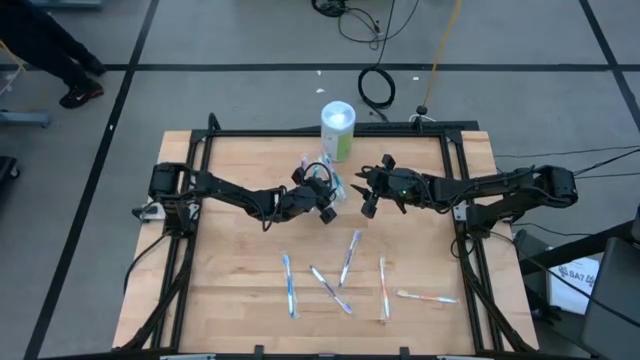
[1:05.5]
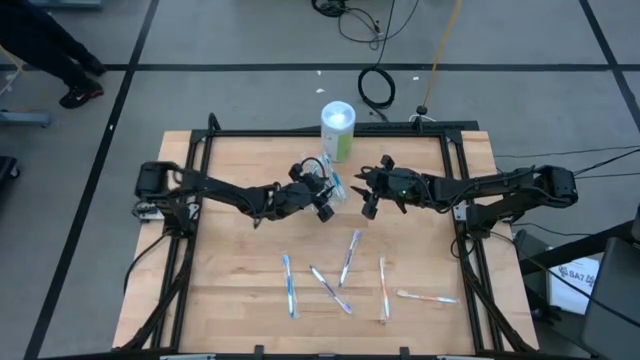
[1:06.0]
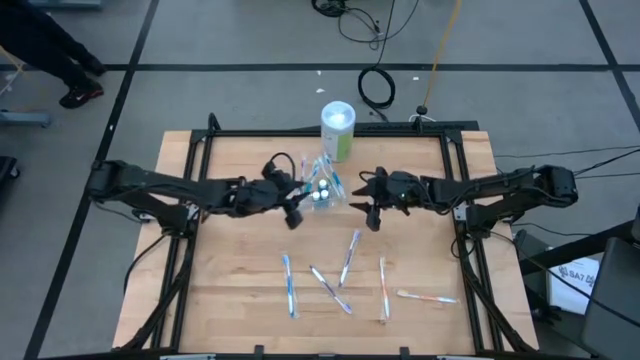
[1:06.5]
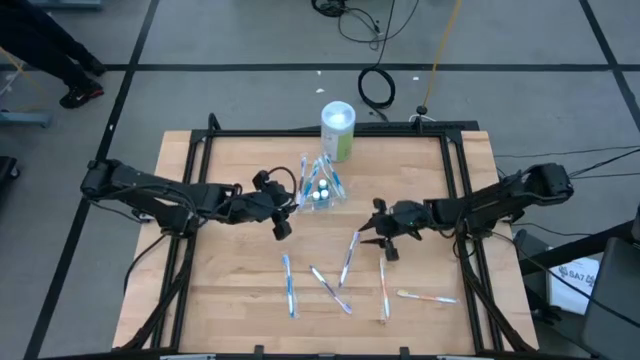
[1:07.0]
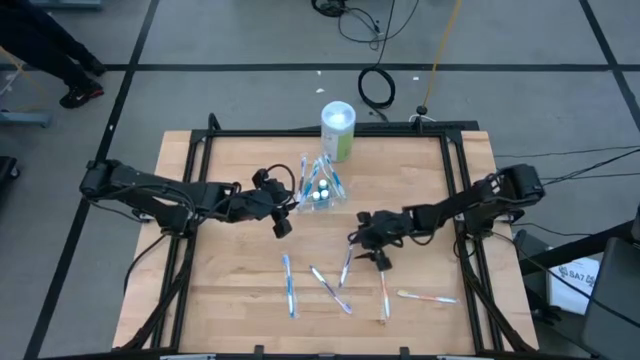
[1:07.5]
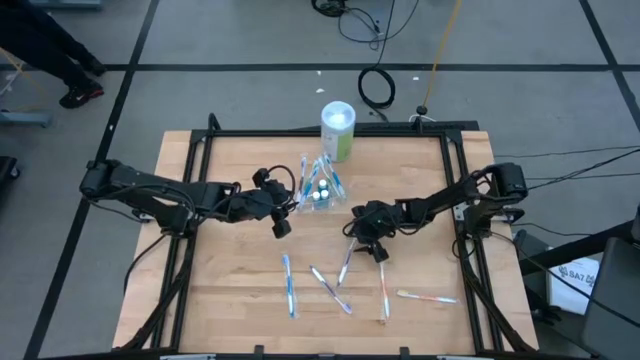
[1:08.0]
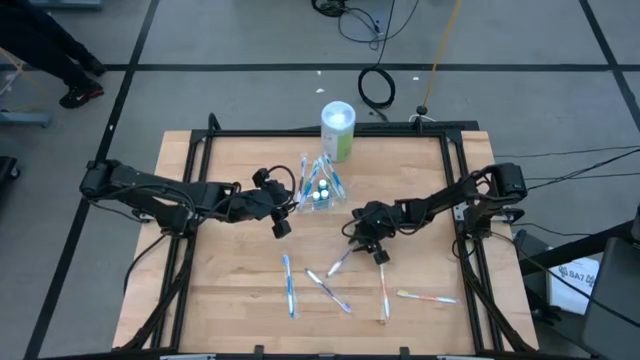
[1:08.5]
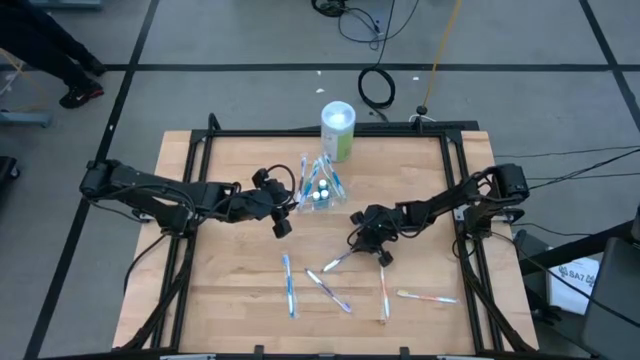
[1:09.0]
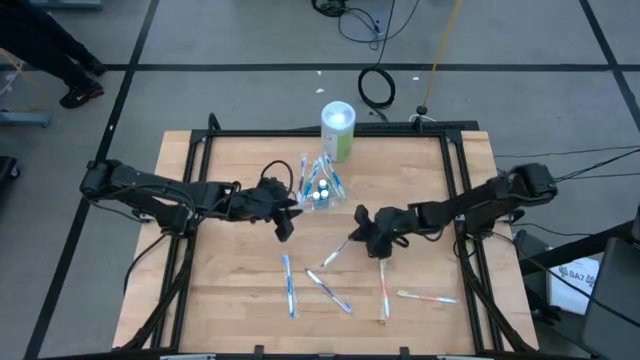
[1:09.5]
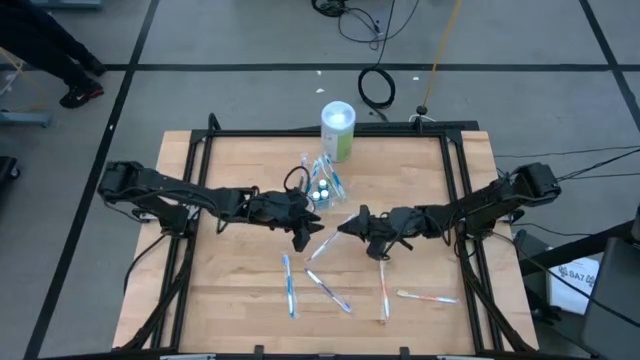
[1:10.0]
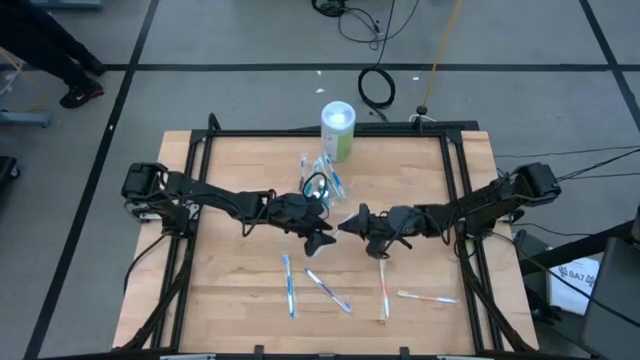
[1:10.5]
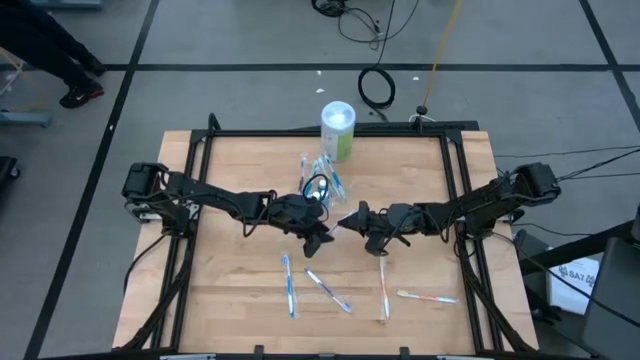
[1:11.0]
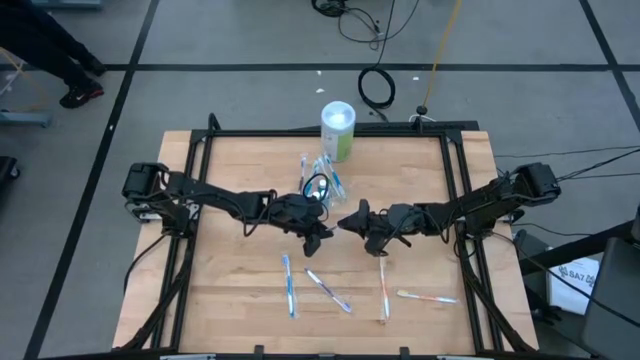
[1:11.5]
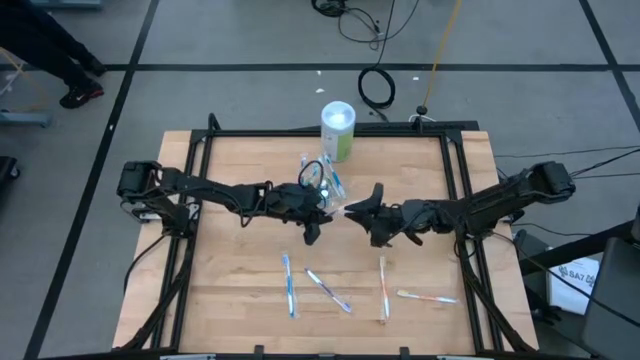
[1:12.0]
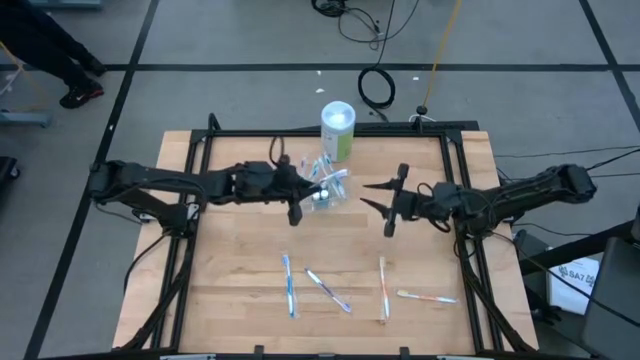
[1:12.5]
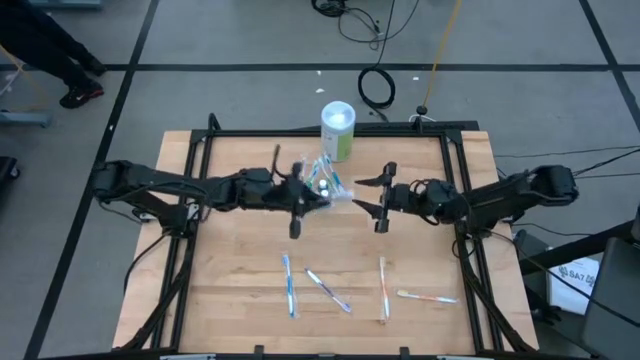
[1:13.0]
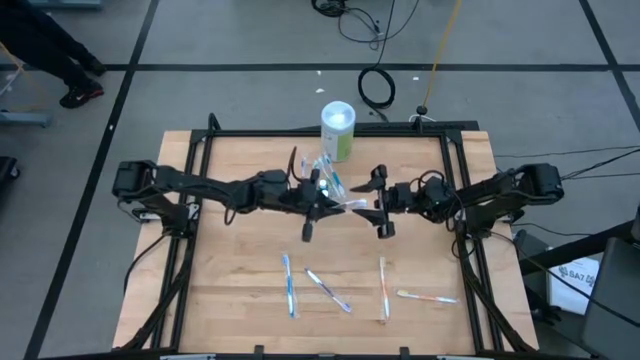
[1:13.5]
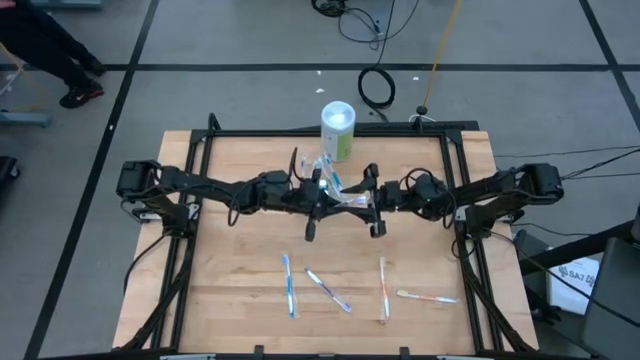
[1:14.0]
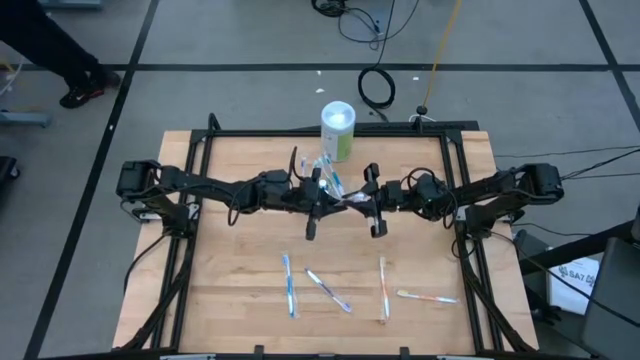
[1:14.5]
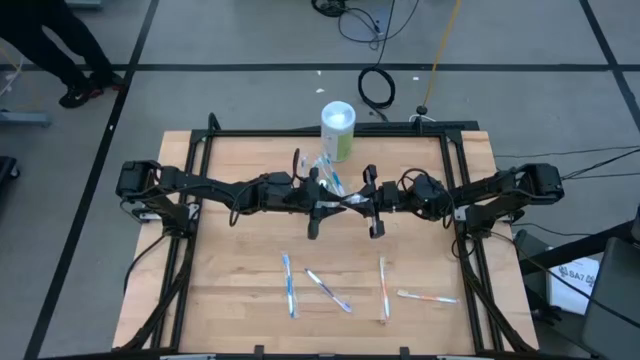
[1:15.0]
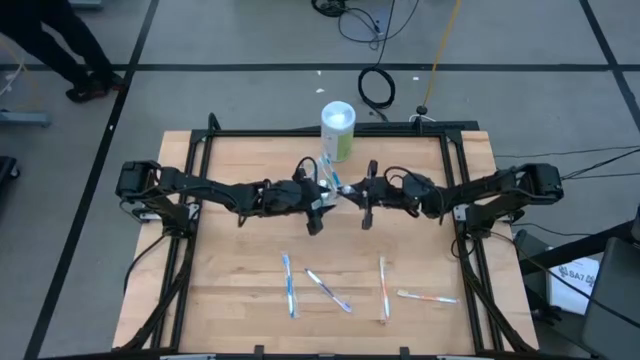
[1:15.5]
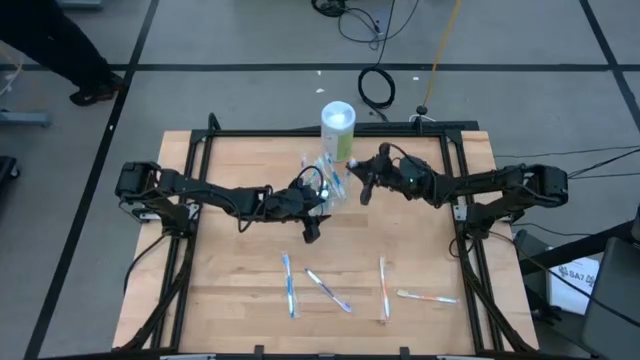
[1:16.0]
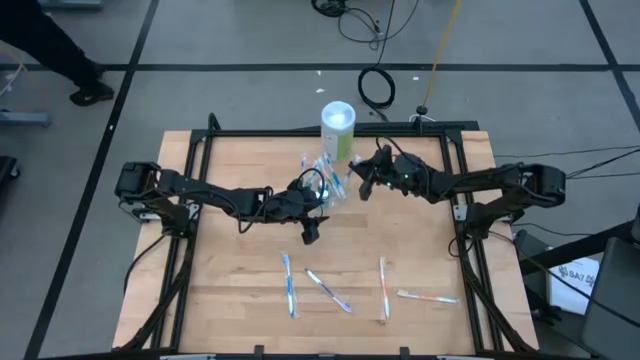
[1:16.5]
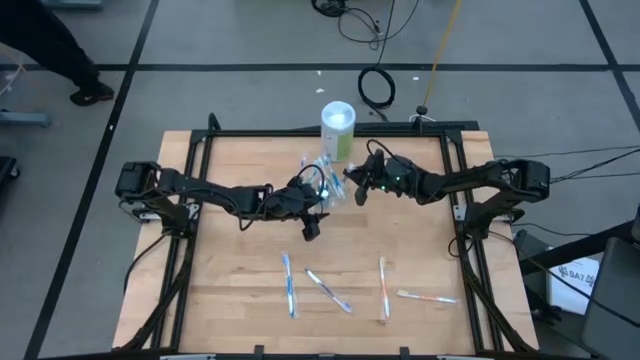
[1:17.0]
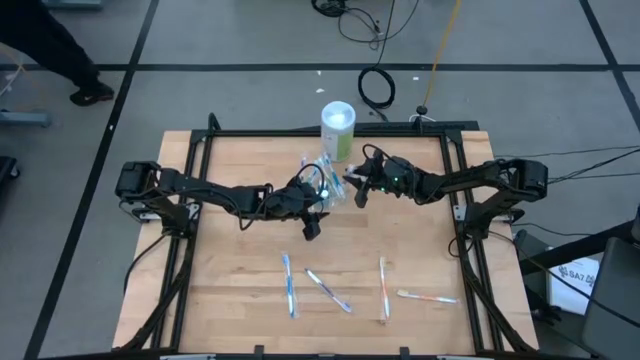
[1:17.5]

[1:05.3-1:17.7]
Task: Pick & Place toothbrushing station
Put the top violet toothbrush into the transparent organizer

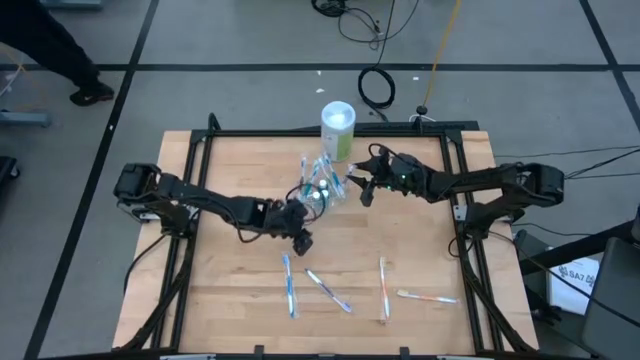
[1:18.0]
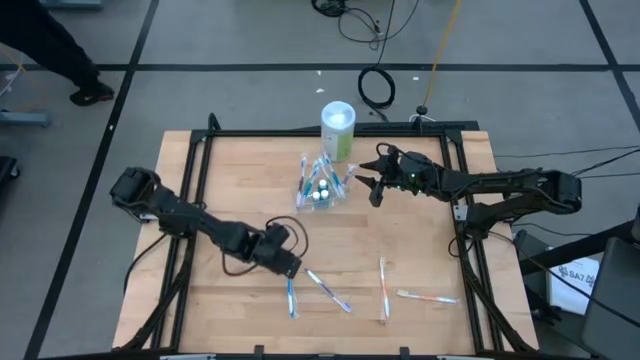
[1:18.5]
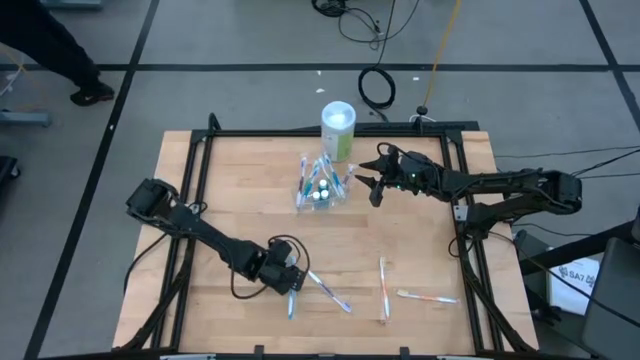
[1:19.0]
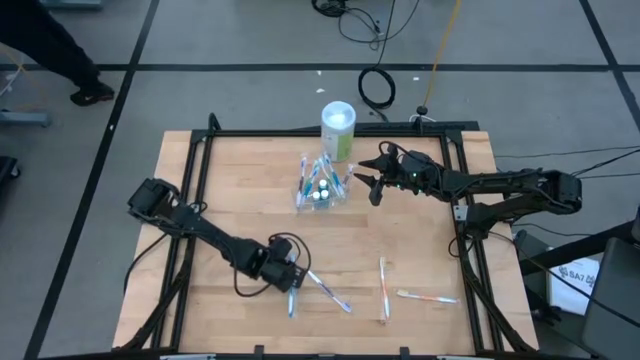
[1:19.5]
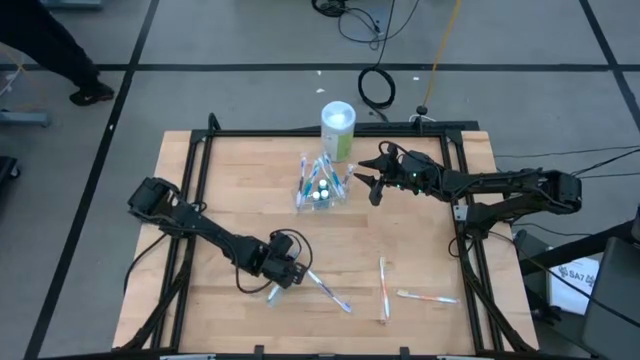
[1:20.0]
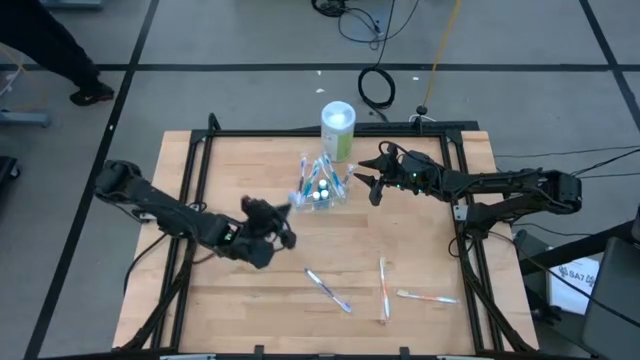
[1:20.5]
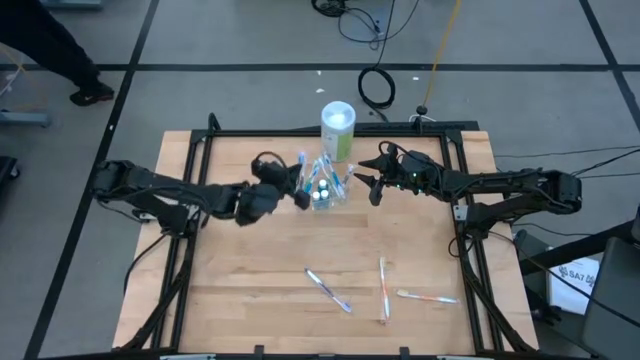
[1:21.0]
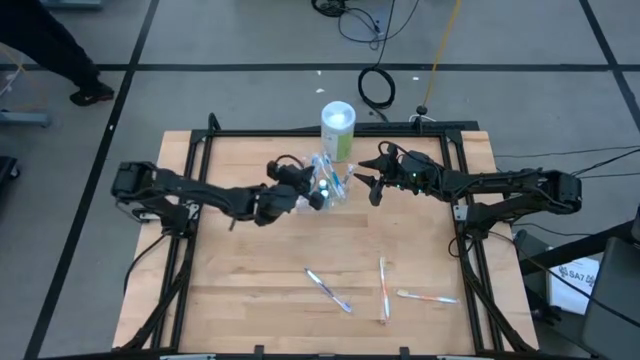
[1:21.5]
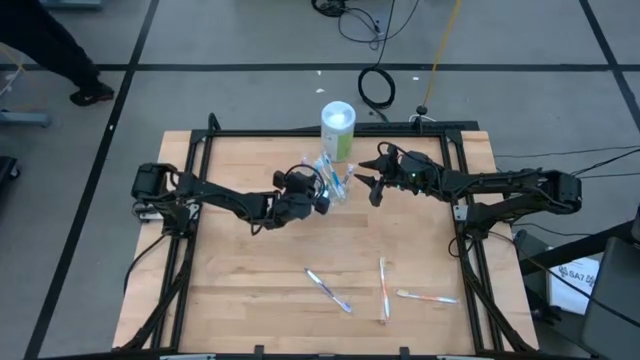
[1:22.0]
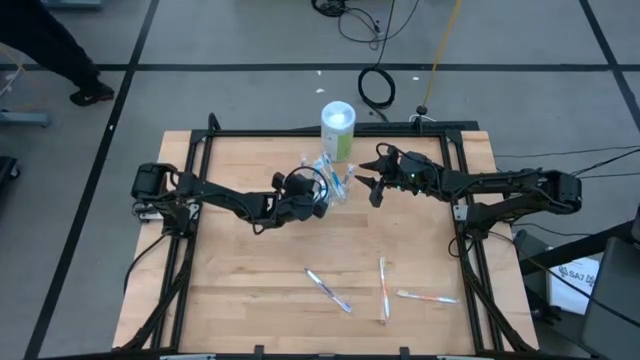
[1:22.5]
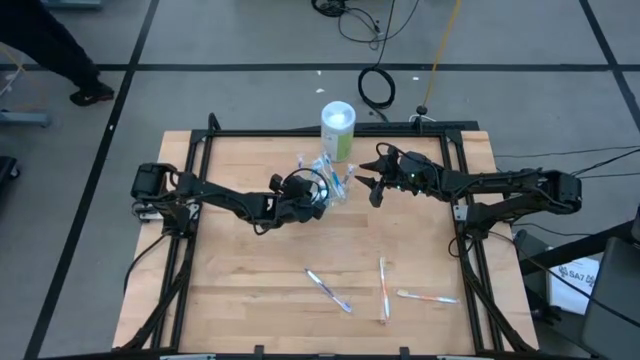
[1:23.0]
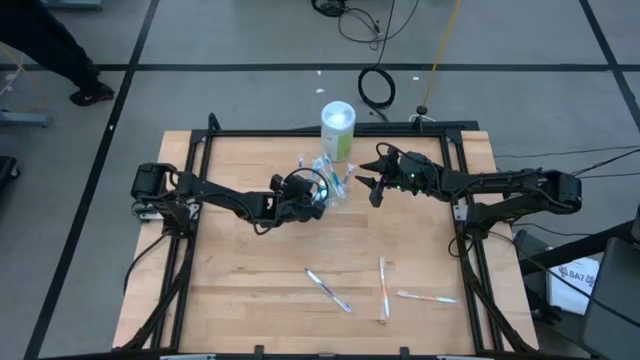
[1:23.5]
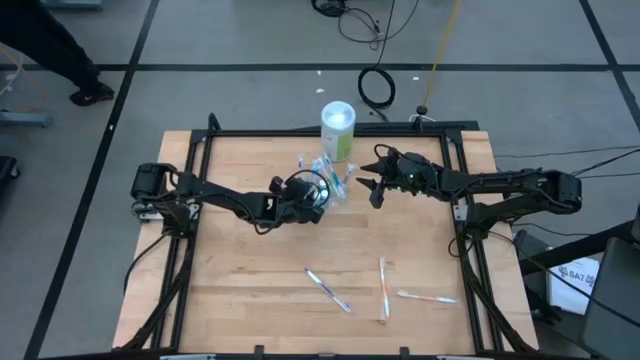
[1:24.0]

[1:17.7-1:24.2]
Put the blue toothbrush into the transparent organizer

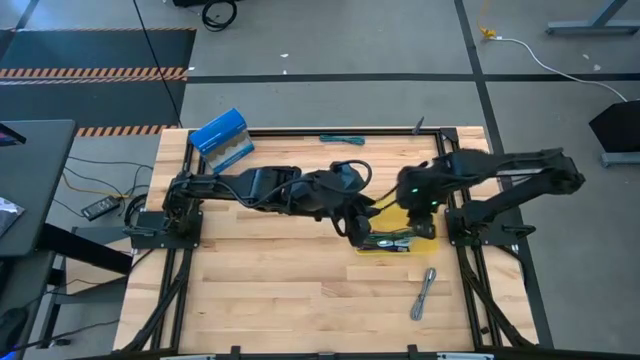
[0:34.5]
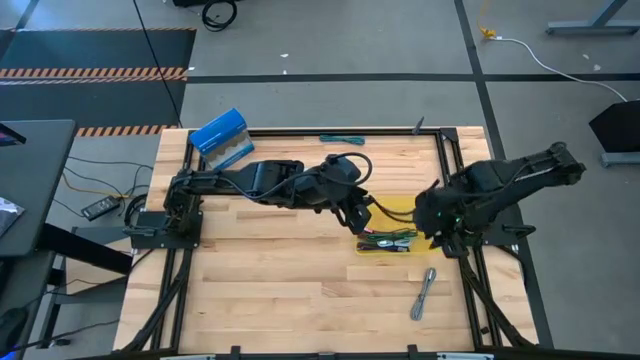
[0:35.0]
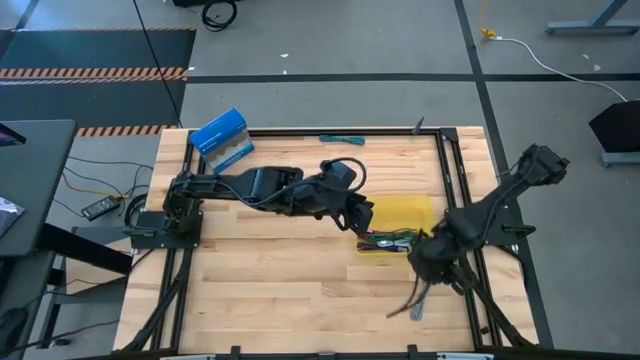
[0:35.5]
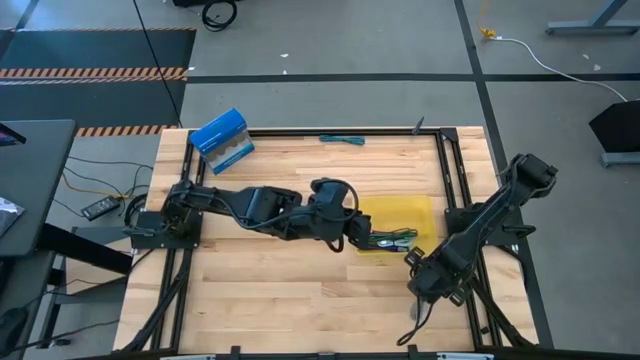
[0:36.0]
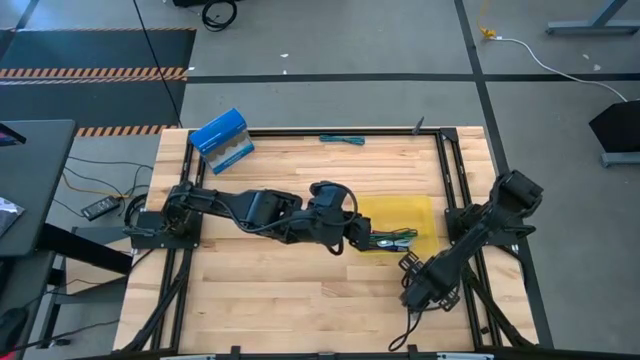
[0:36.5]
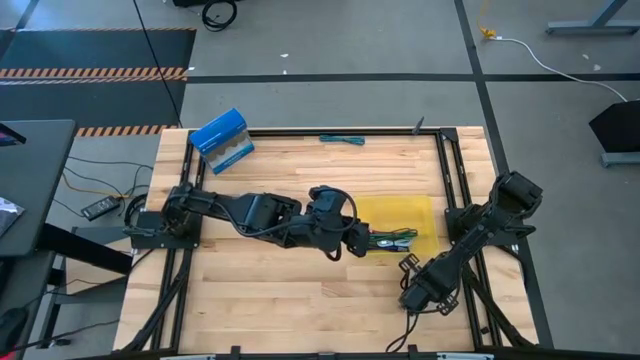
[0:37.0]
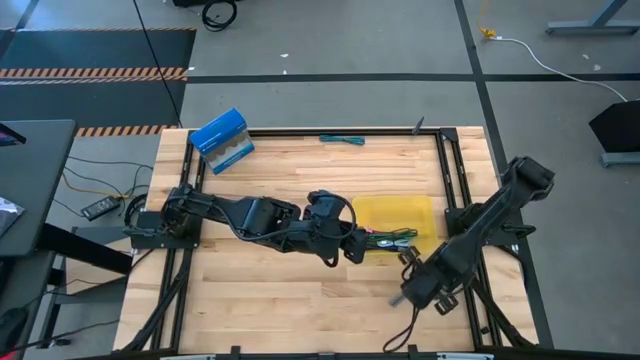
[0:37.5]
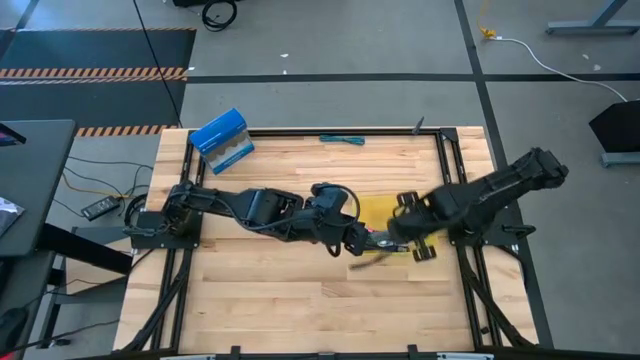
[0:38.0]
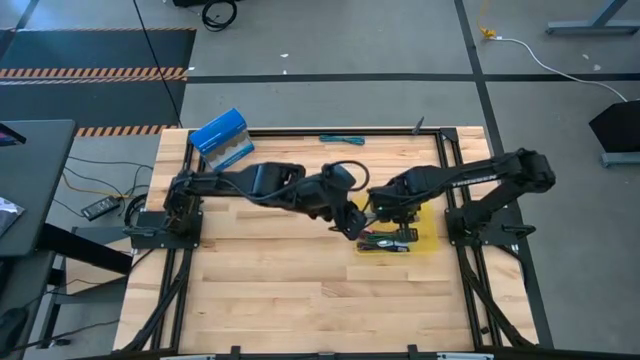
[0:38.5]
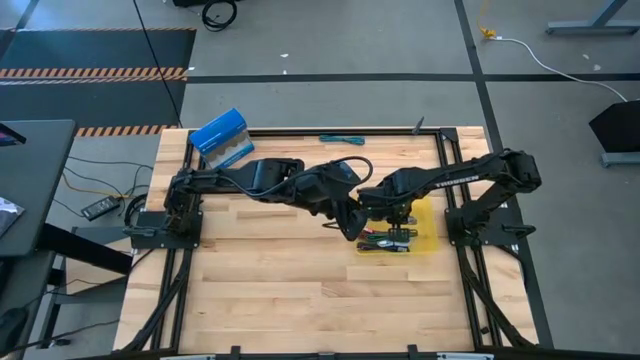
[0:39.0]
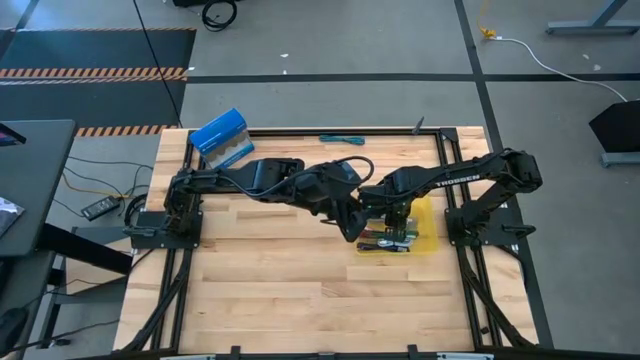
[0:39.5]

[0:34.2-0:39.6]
Task: Pick and place USB-C Cables
Put the gray charger cable into the yellow bin
